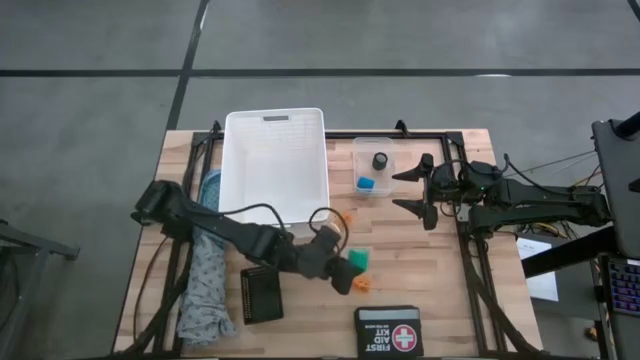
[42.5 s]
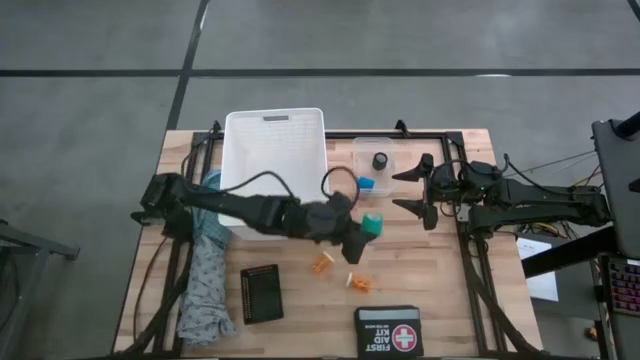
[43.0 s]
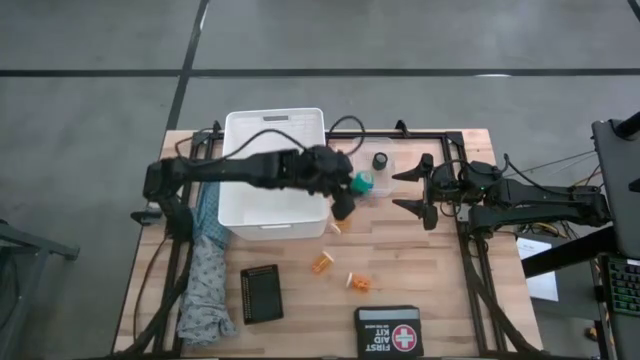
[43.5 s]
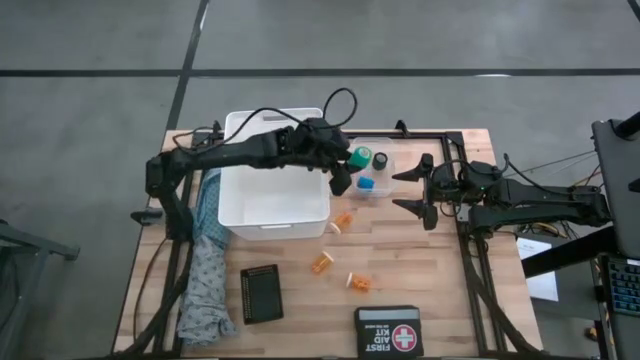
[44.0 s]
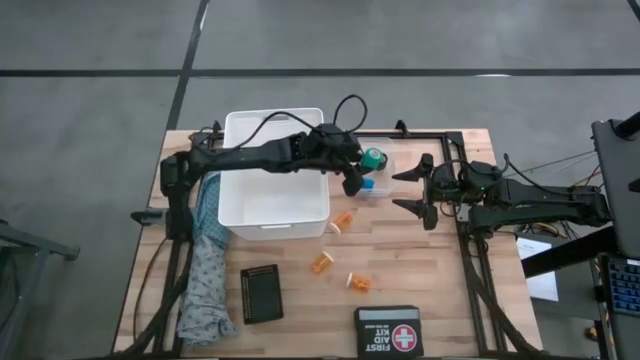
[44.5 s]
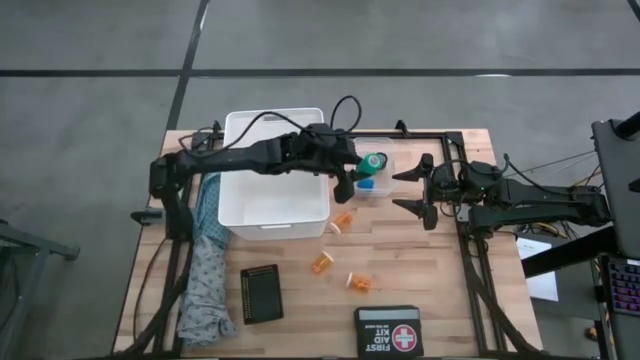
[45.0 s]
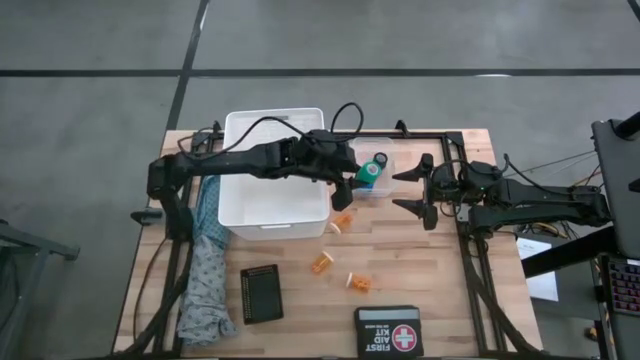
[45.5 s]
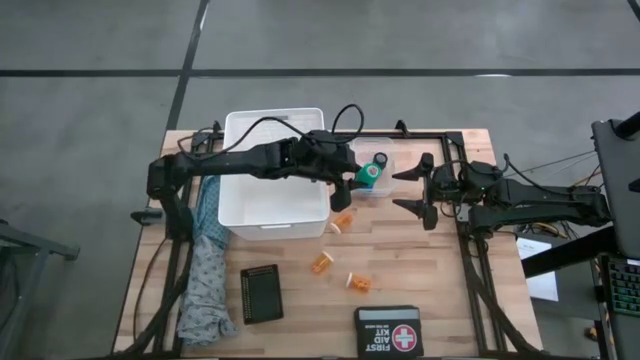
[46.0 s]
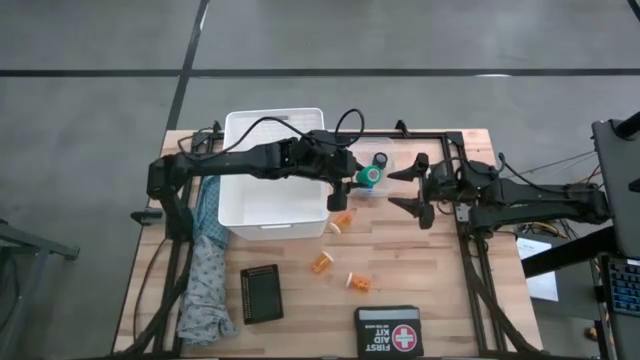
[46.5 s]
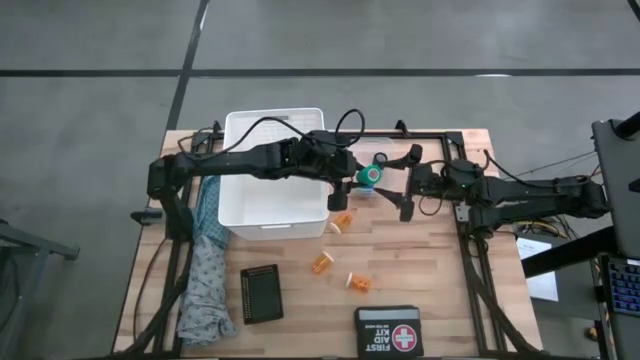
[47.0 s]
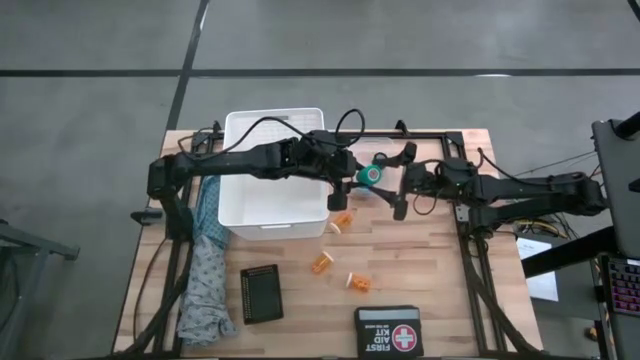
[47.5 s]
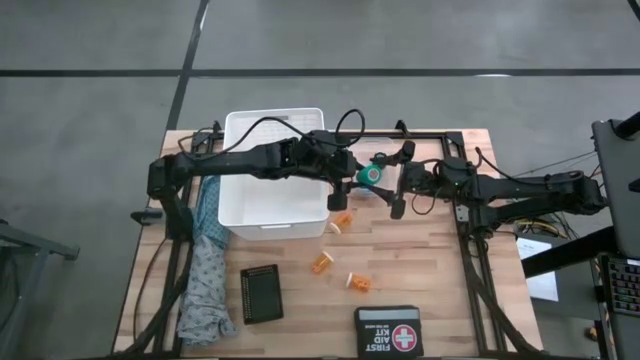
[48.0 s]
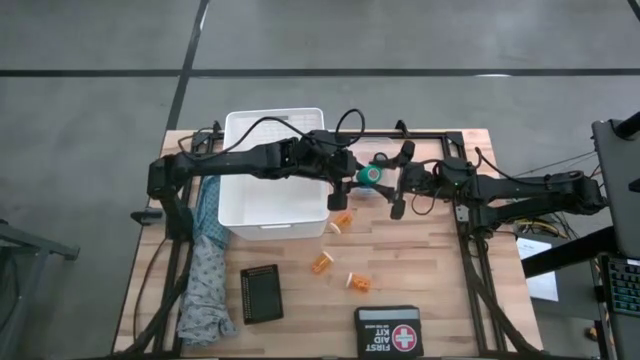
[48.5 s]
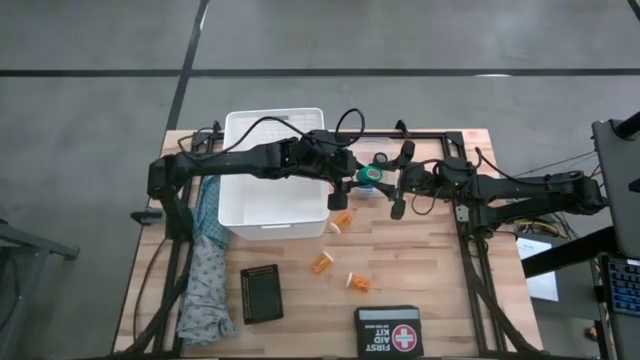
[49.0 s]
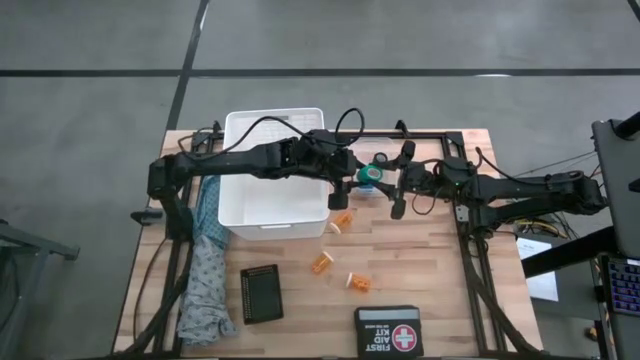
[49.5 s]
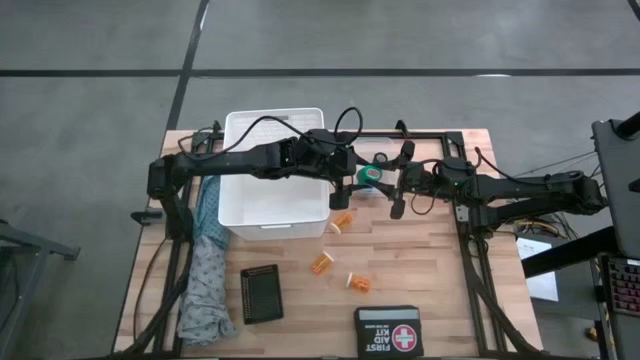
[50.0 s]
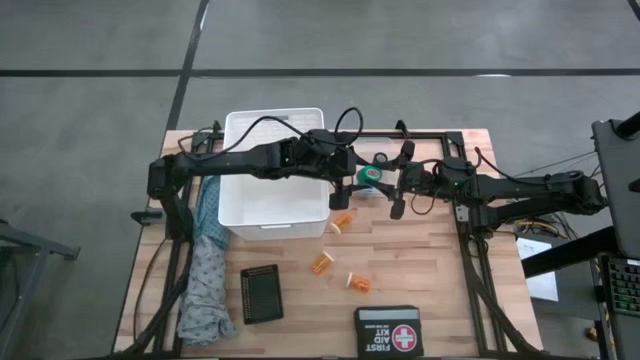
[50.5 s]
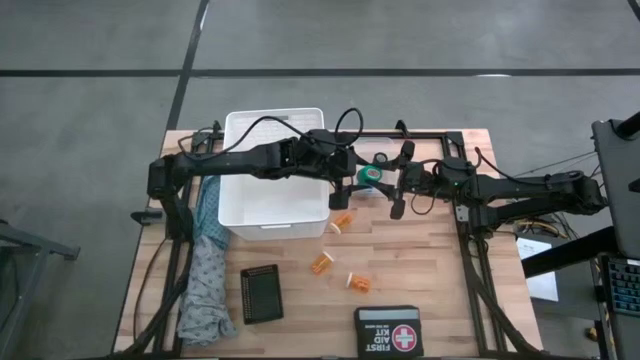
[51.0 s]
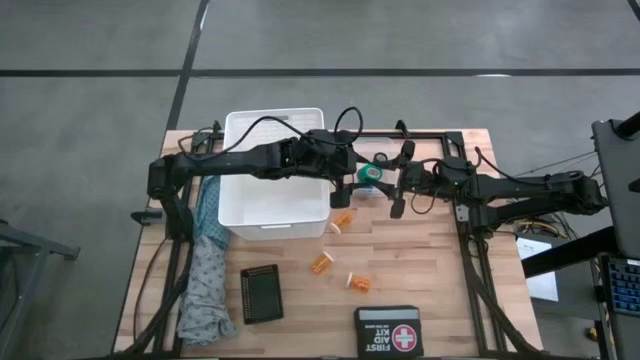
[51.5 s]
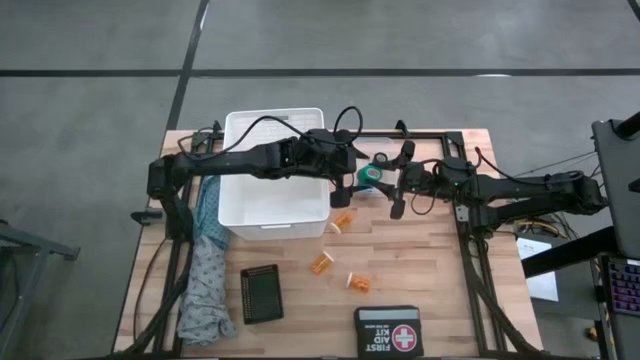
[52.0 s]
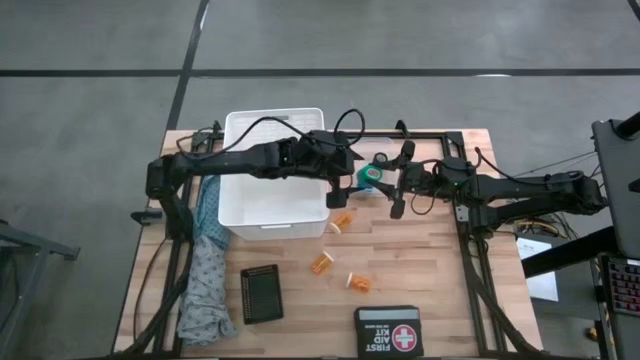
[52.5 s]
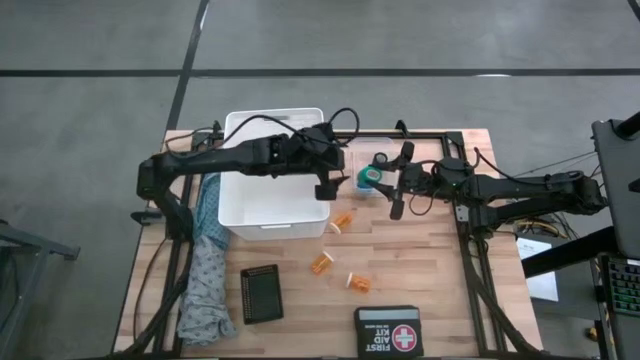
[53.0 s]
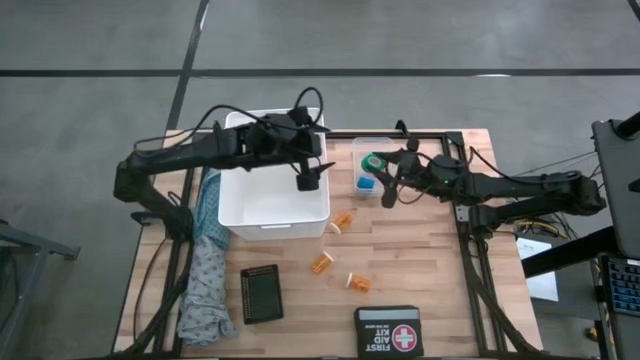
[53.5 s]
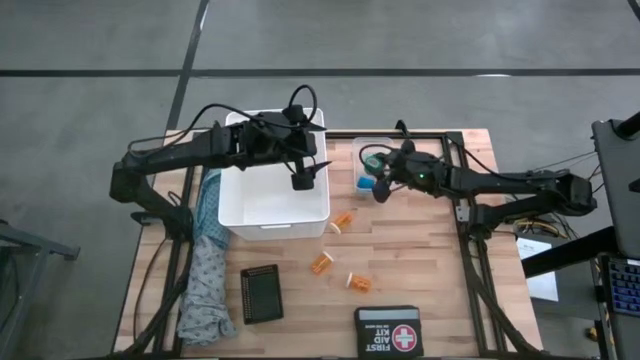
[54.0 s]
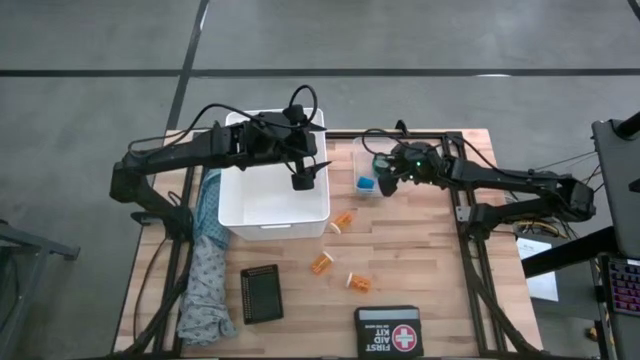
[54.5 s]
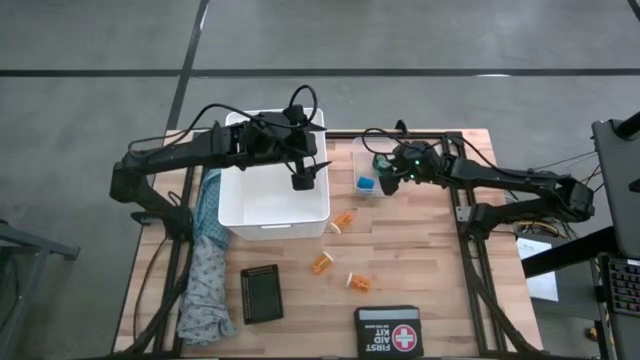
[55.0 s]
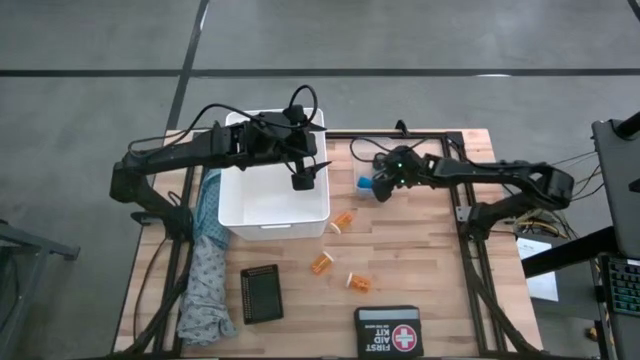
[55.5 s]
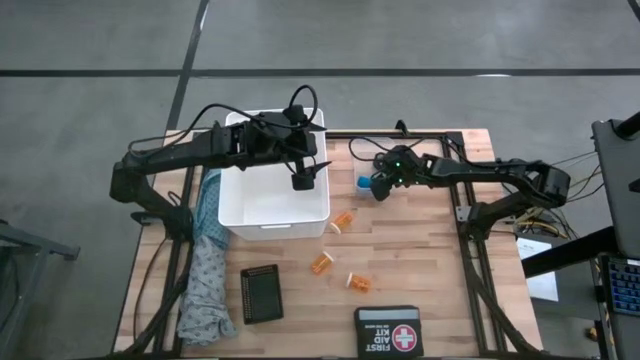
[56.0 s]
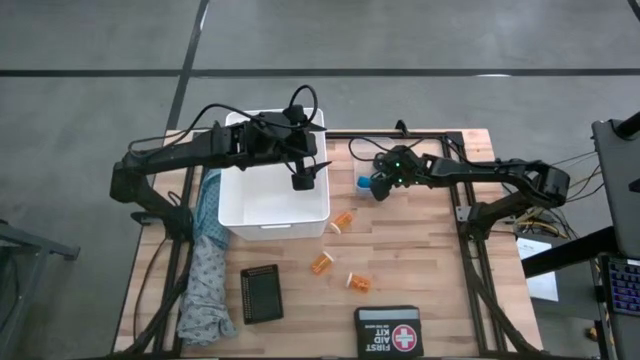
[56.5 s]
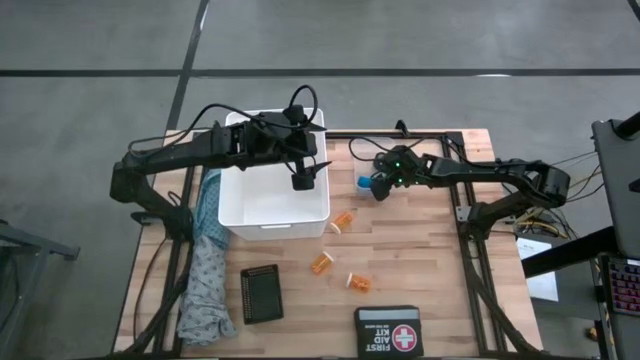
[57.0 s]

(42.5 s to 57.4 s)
Task: Pick & place medical supplies in basket/bin
Put the green roll bandage into the transparent bin

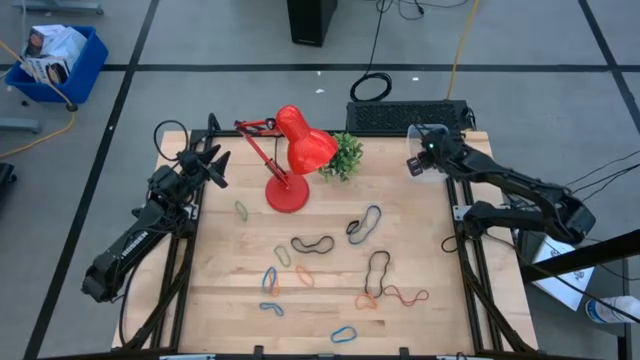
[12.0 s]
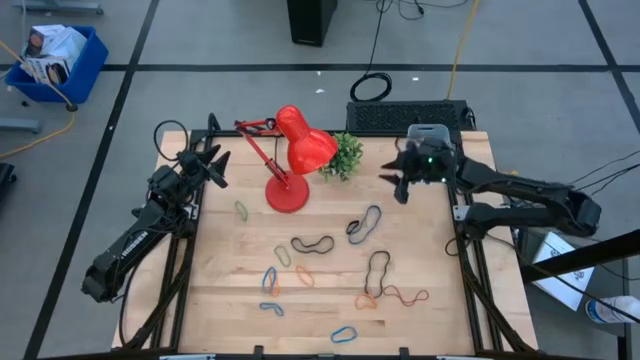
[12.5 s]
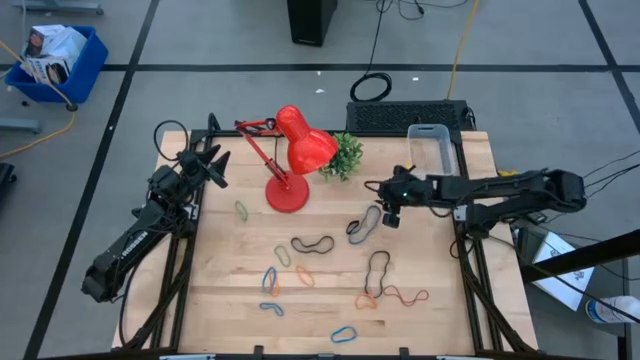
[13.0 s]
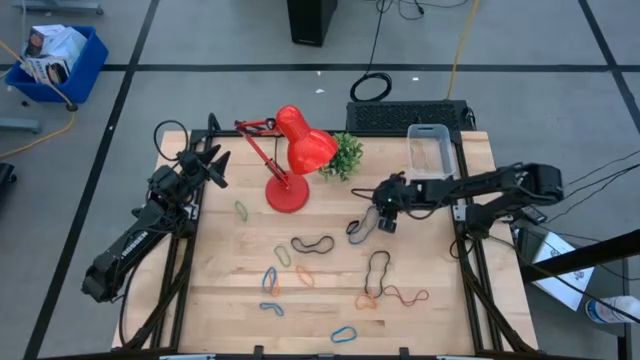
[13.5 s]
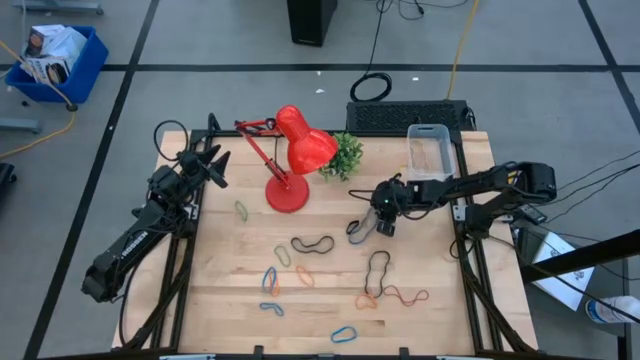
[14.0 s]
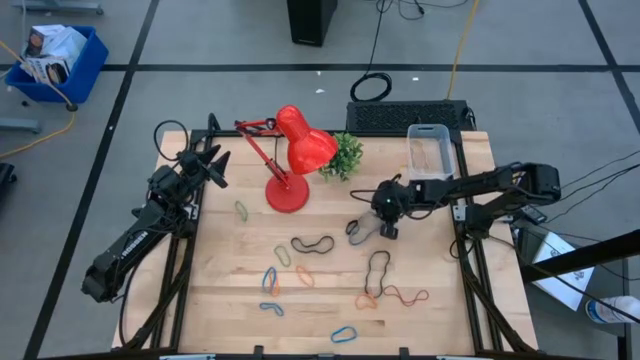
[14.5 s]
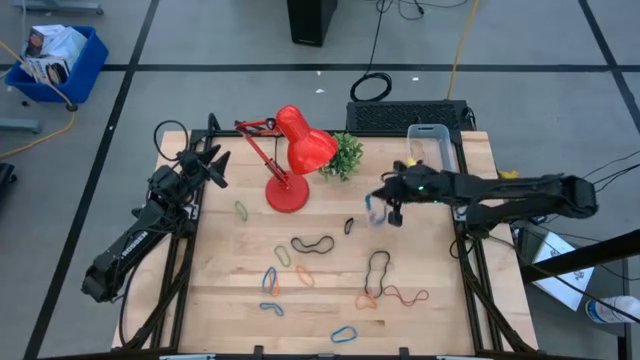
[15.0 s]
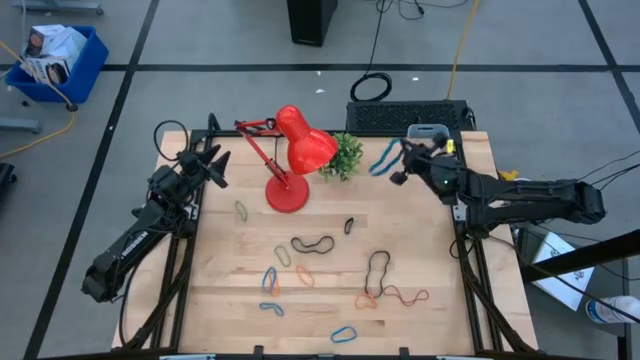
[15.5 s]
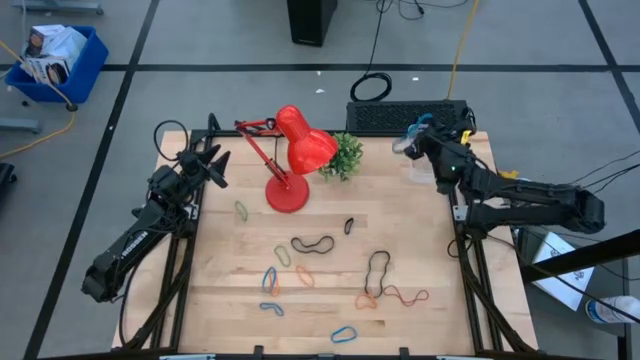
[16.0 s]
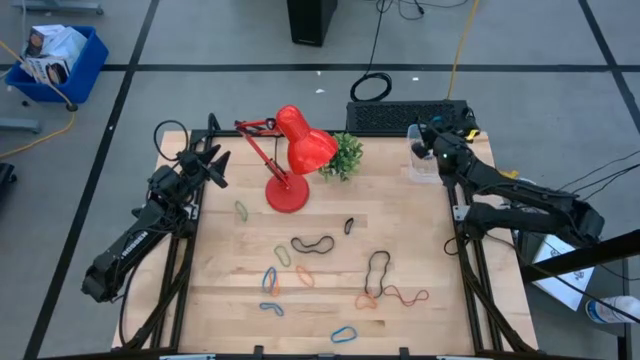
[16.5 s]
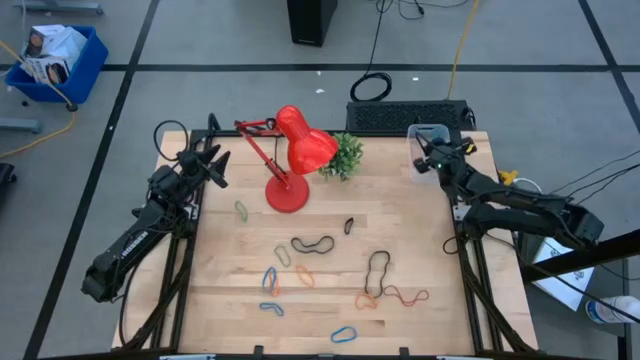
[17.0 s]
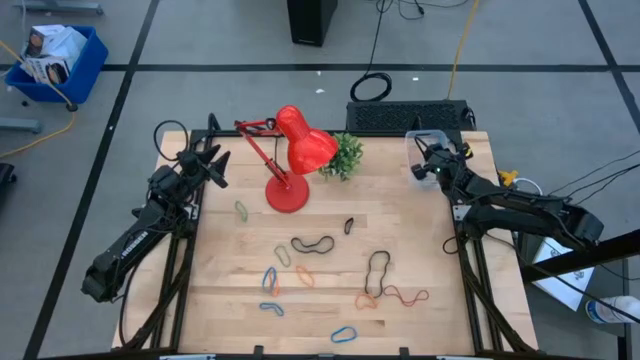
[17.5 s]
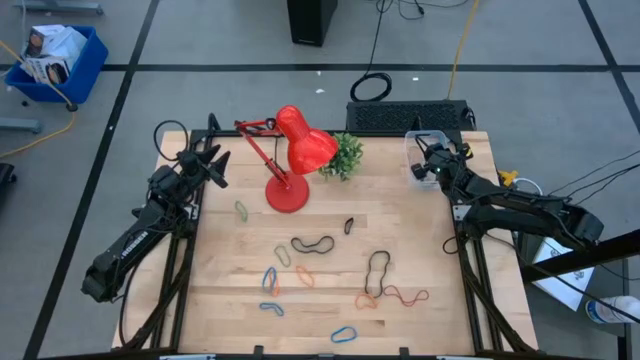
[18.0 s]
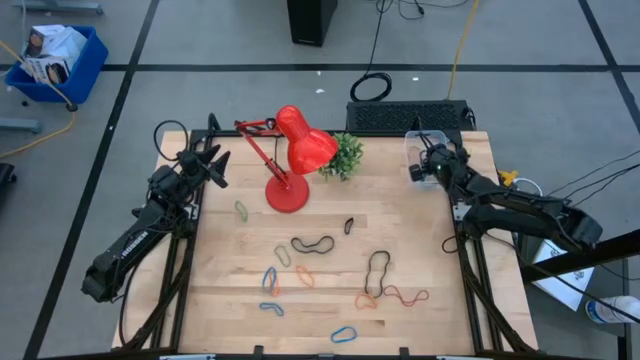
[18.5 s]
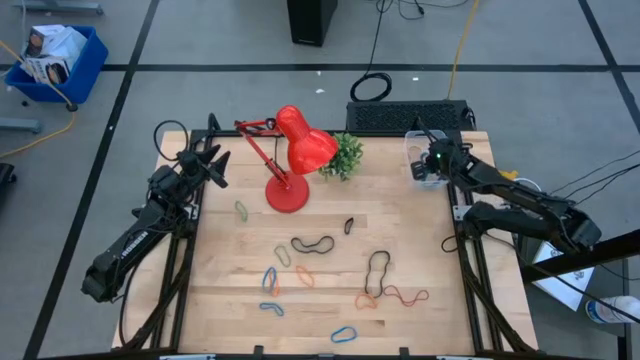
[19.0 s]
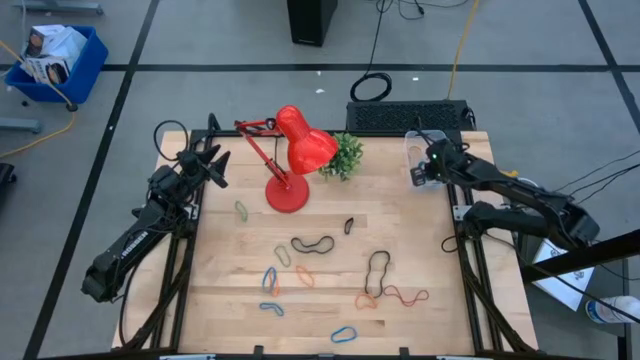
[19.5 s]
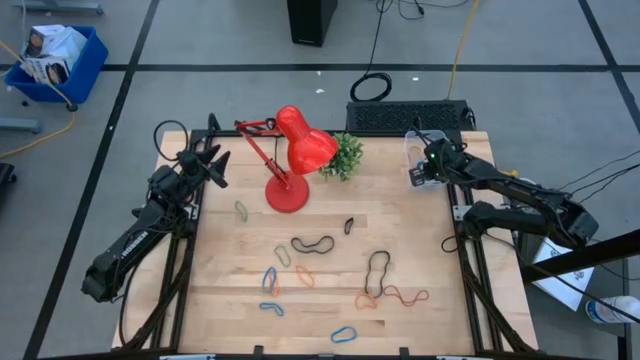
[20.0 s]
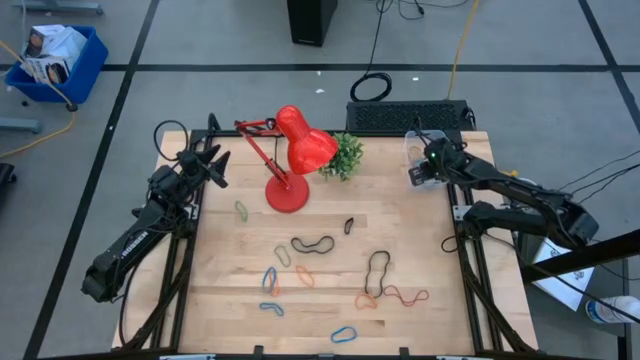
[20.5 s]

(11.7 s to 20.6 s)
Task: Pick and place rubber bands into bin
Put the blue rubber band into the transparent bin
